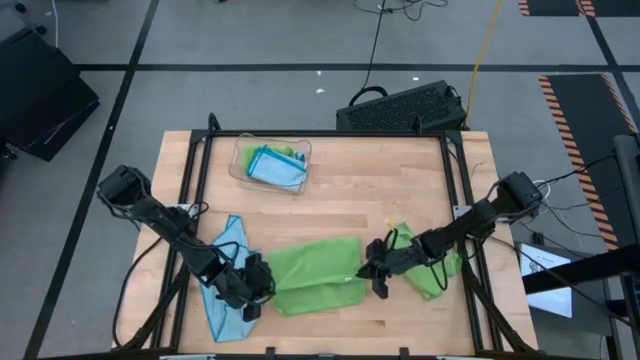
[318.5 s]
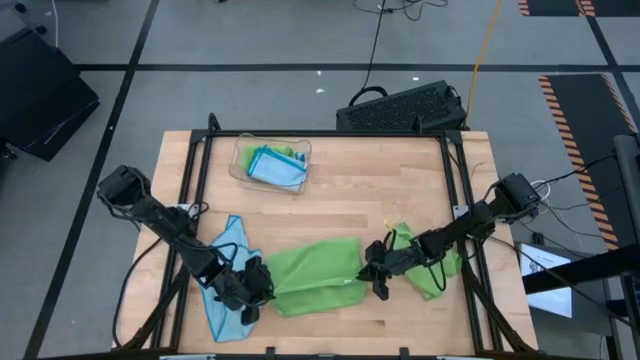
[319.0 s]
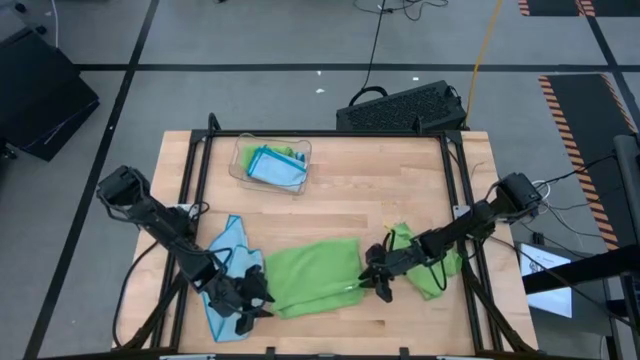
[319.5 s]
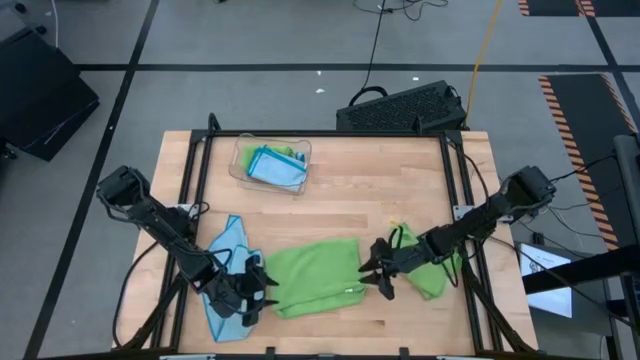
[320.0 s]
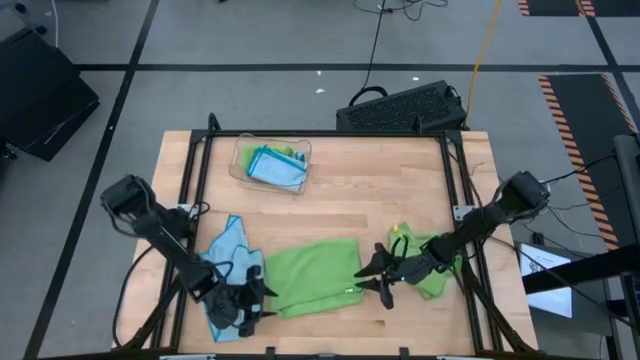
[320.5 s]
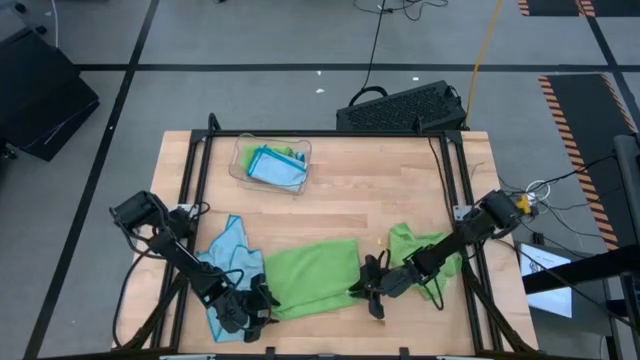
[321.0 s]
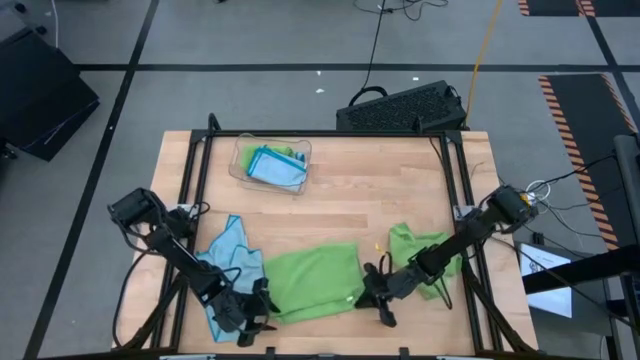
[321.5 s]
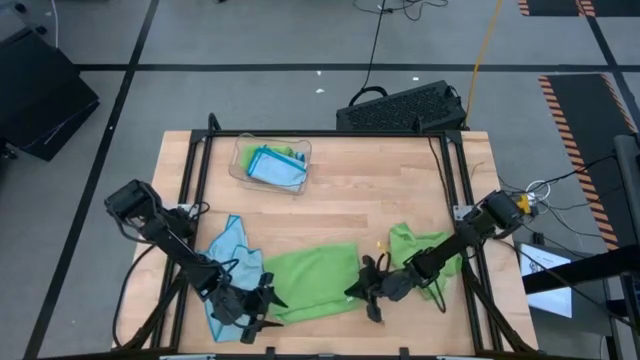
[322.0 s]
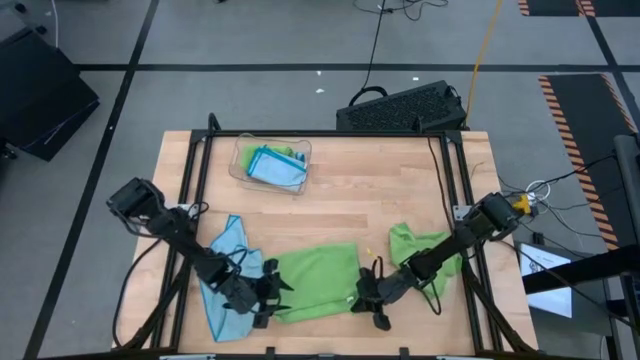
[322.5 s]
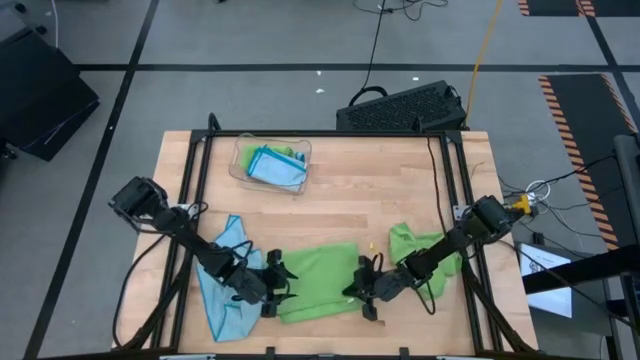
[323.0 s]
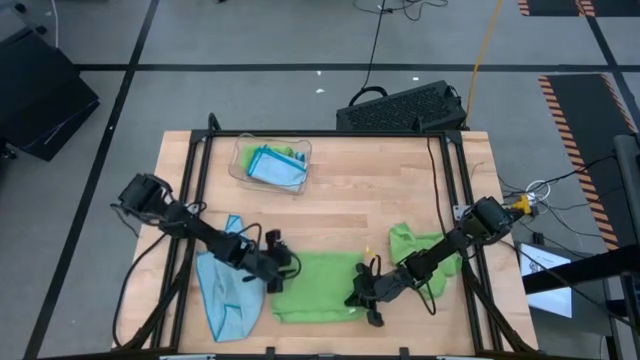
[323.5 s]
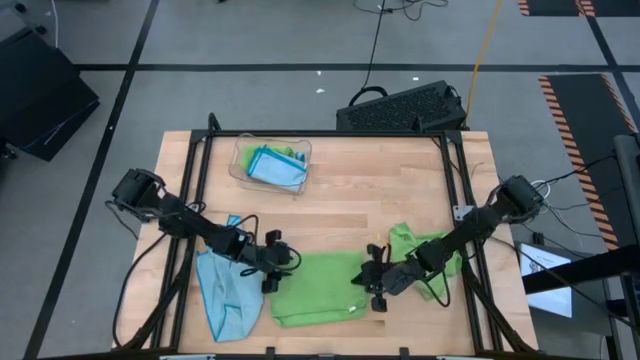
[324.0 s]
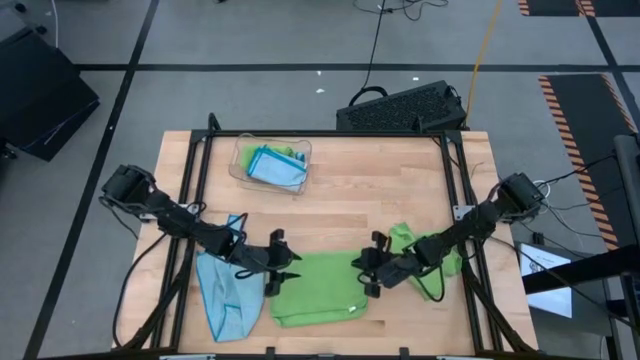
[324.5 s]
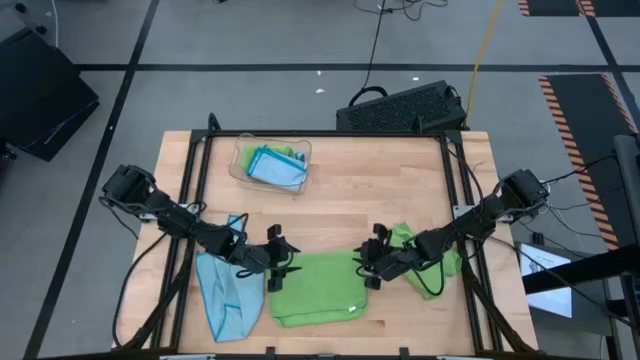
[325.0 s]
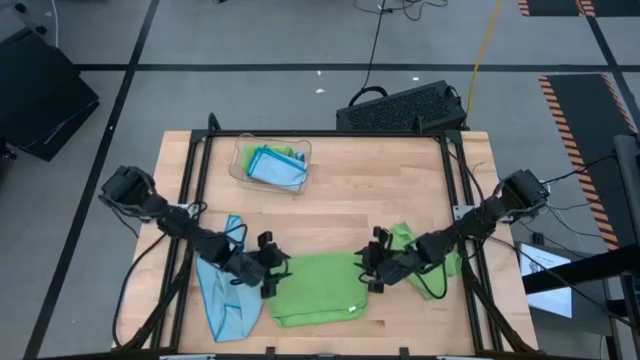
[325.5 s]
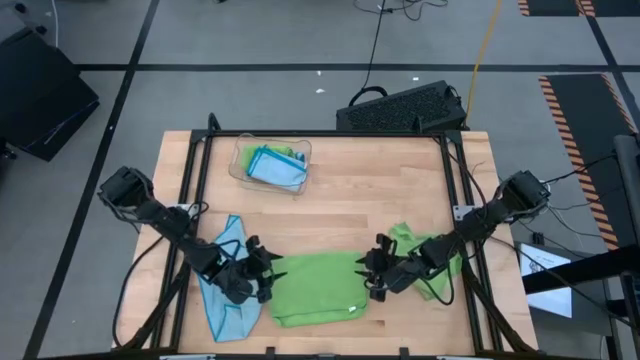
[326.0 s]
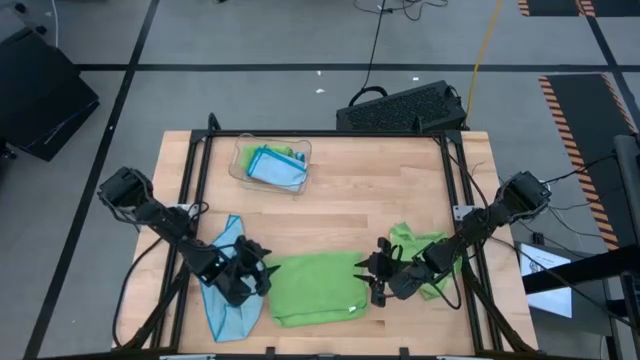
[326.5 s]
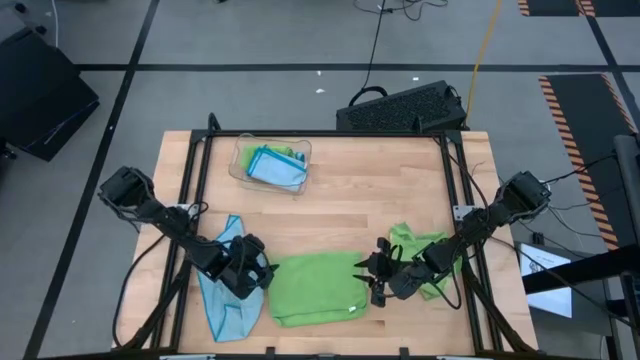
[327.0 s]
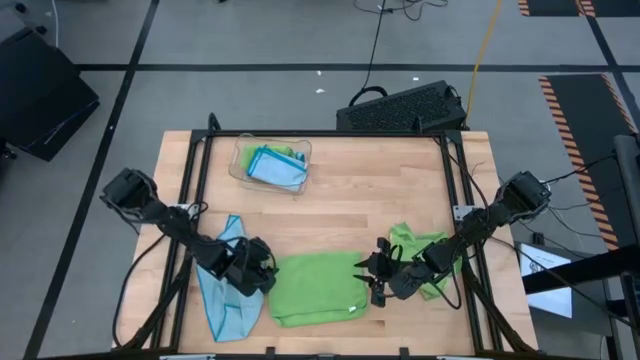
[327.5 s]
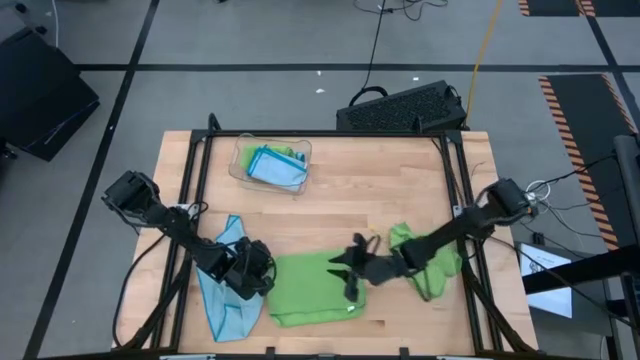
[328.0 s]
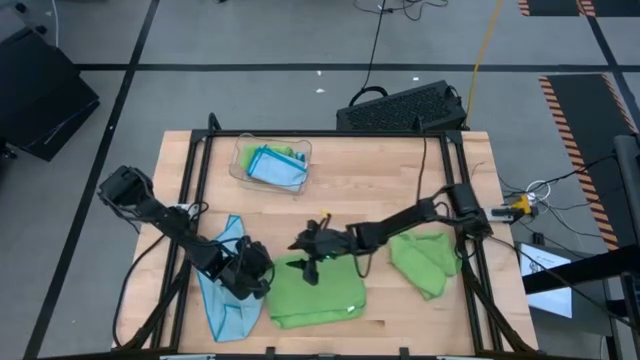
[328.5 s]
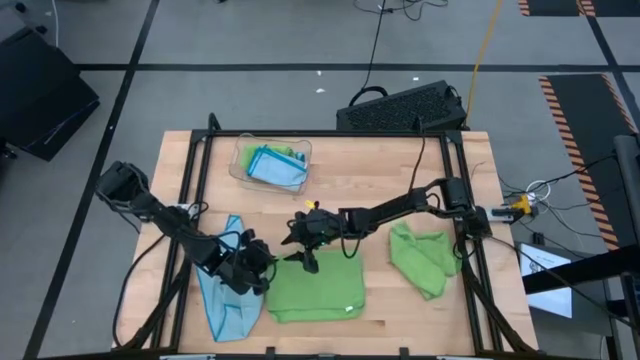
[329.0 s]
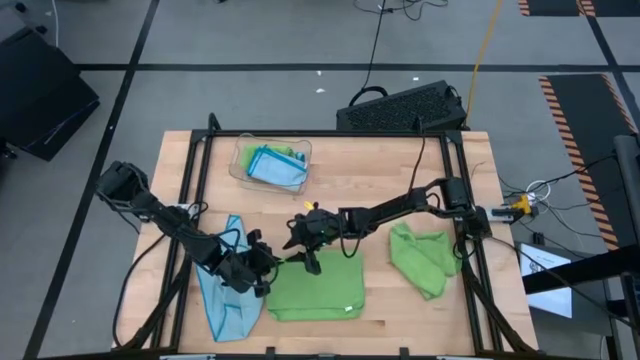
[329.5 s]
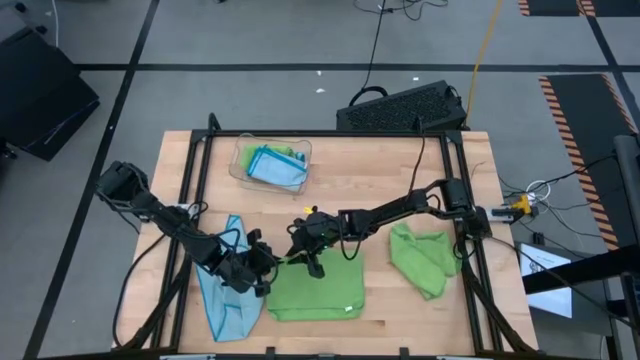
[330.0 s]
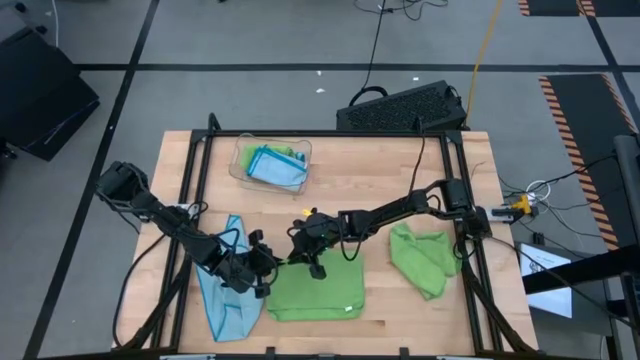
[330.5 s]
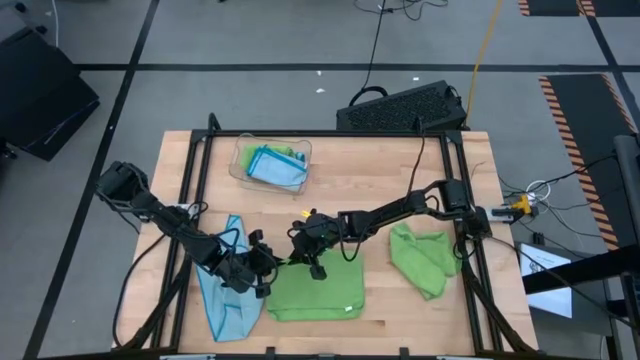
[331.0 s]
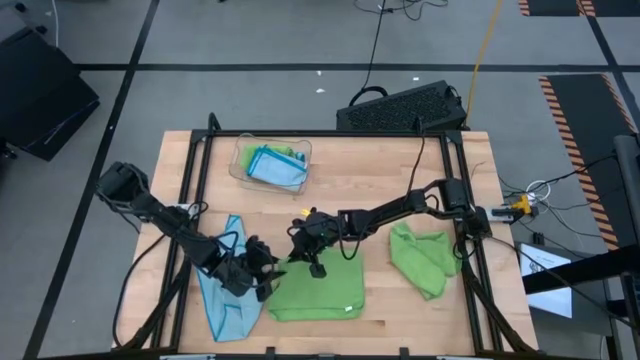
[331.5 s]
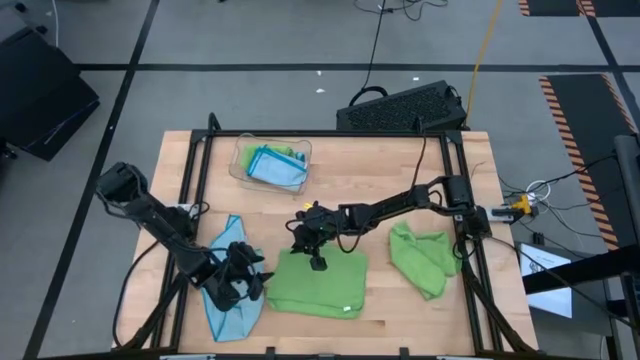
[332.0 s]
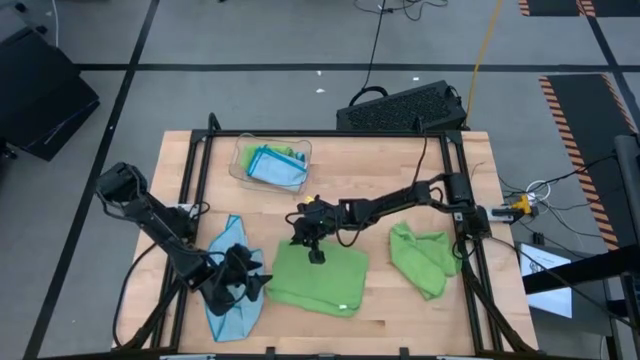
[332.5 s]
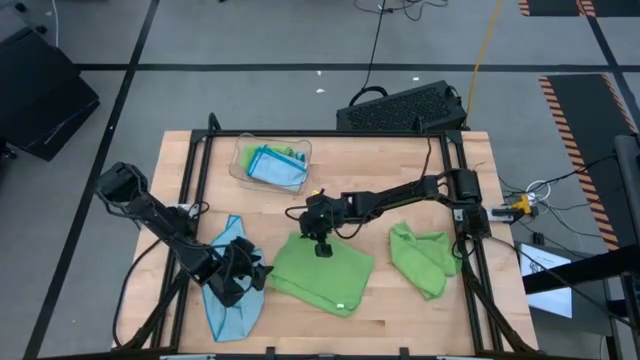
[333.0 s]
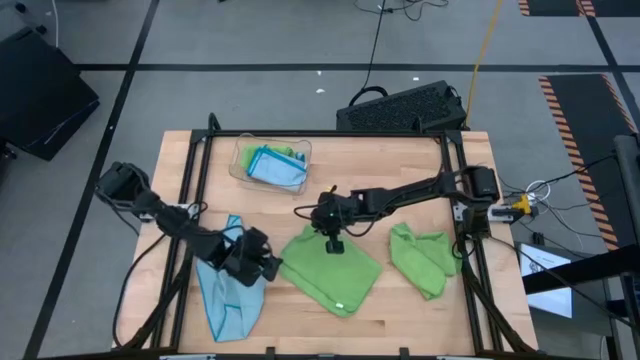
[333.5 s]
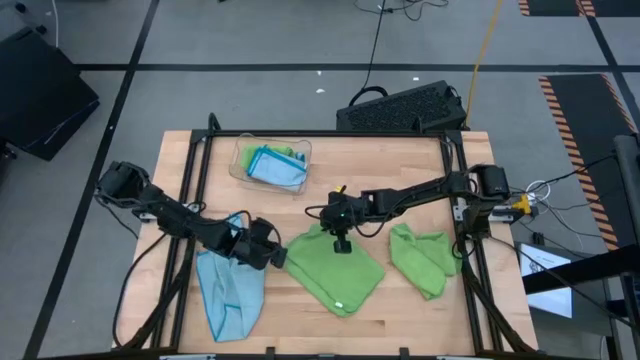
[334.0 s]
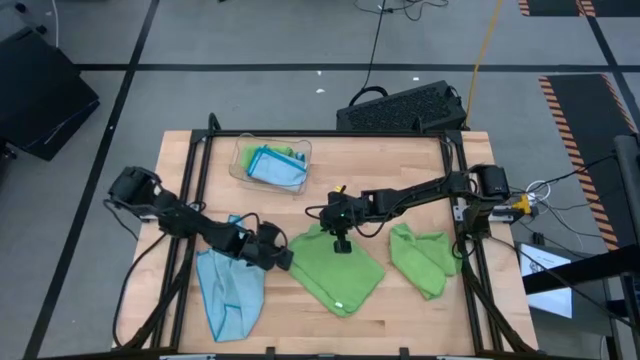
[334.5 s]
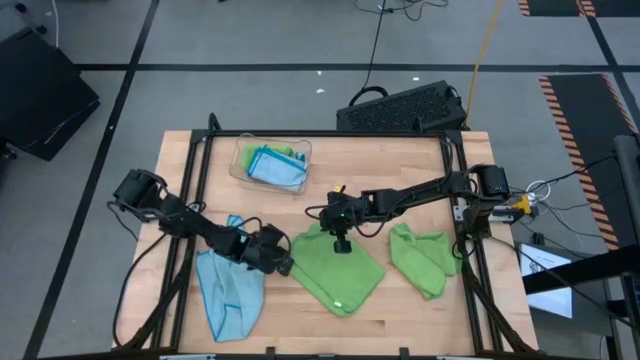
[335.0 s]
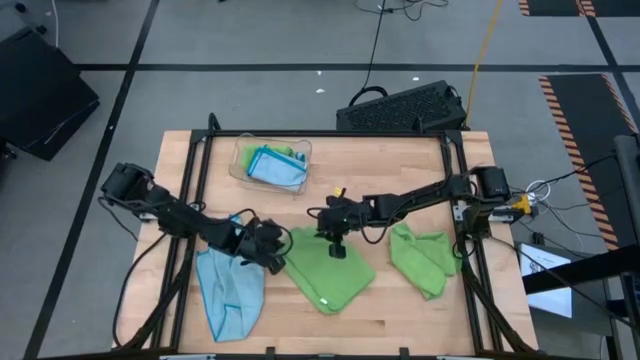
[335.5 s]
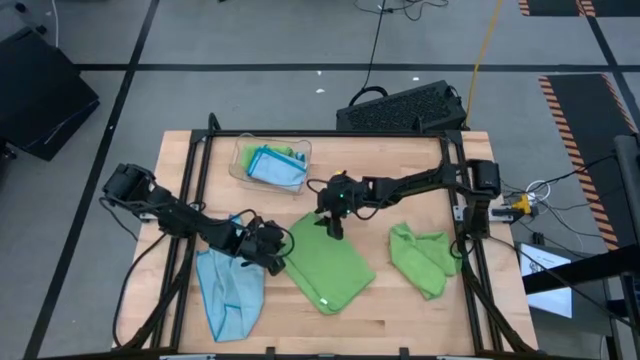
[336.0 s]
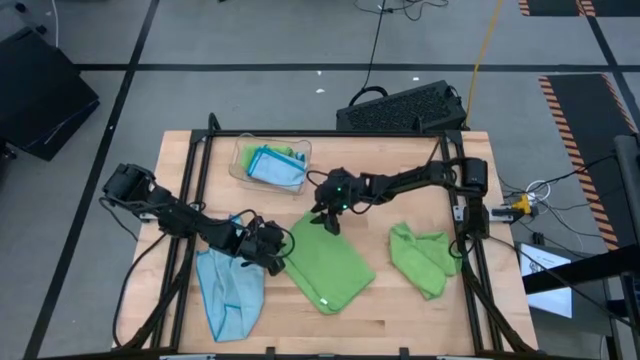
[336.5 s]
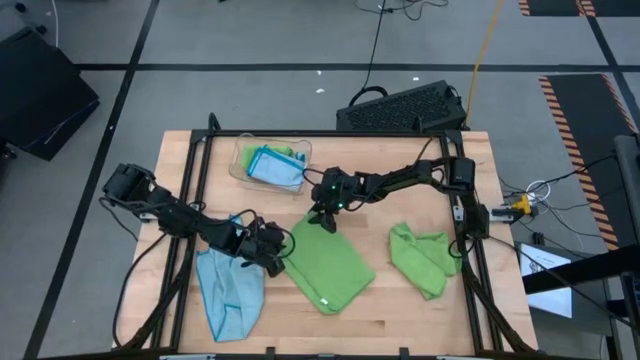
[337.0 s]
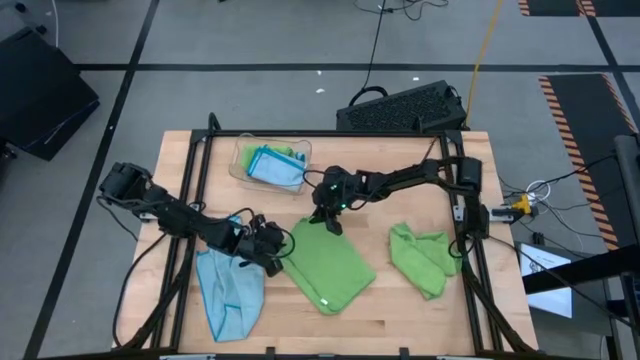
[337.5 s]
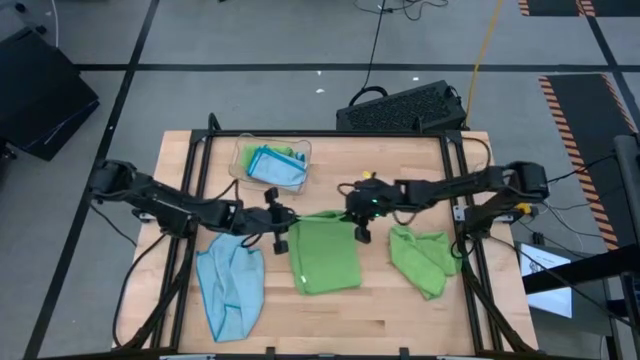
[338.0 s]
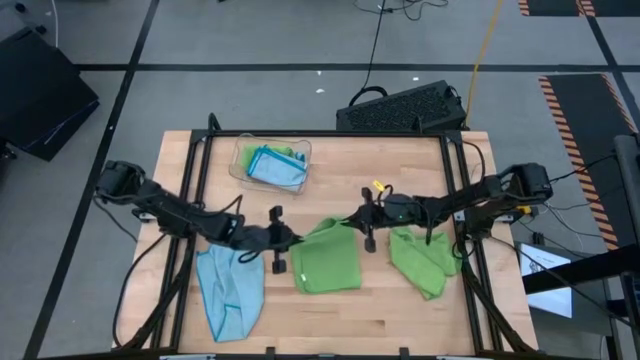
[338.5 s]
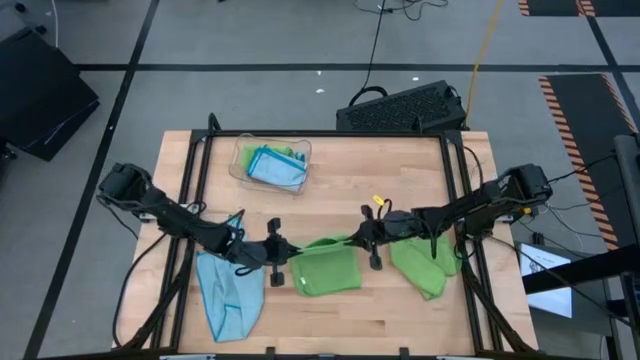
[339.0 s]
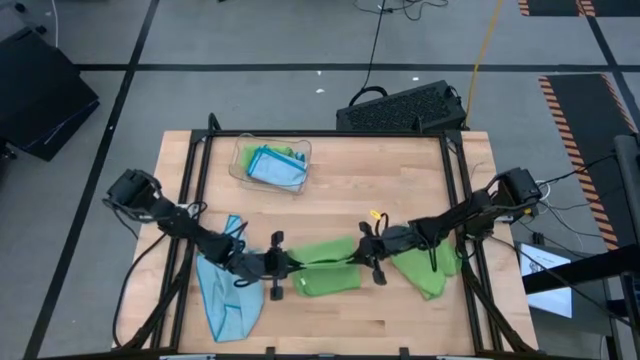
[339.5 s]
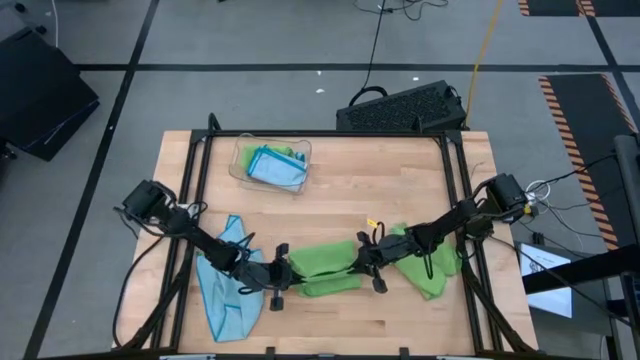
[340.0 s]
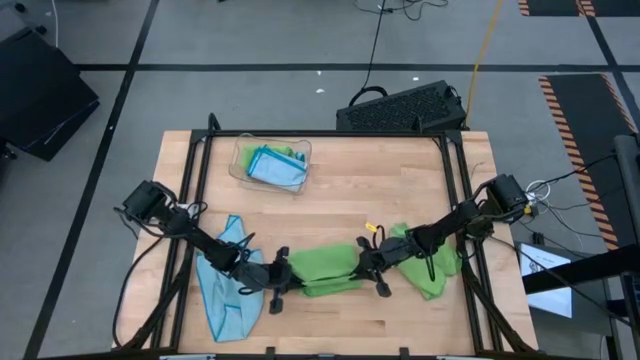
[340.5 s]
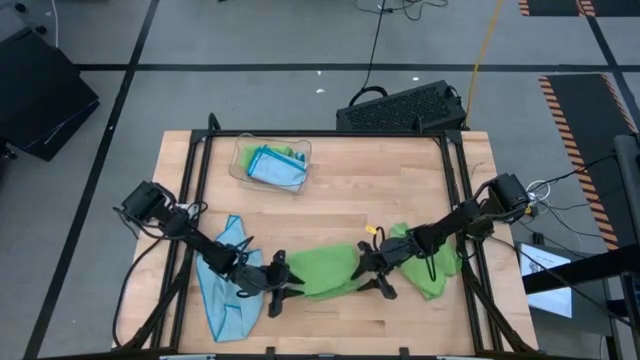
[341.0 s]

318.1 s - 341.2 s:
Task: Fold microfiber towels
Fold the top green microfiber cloth
